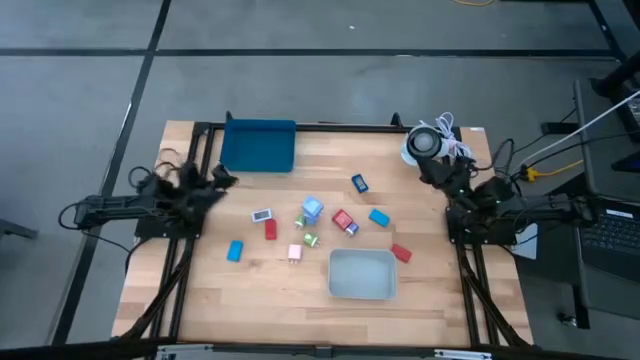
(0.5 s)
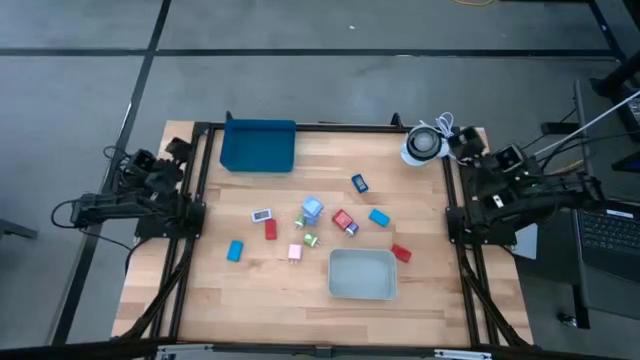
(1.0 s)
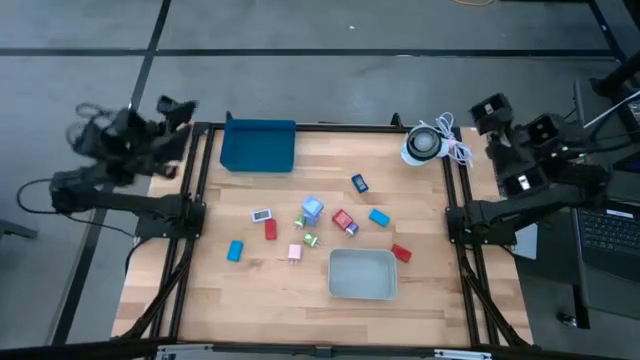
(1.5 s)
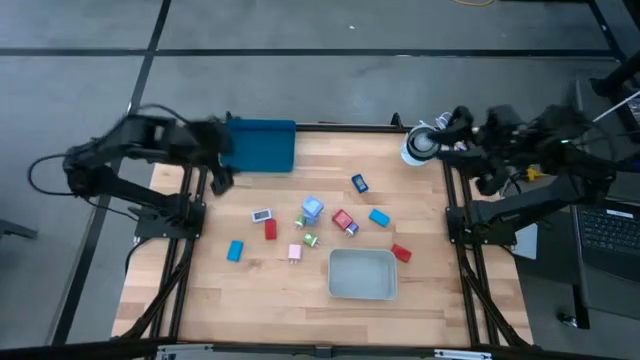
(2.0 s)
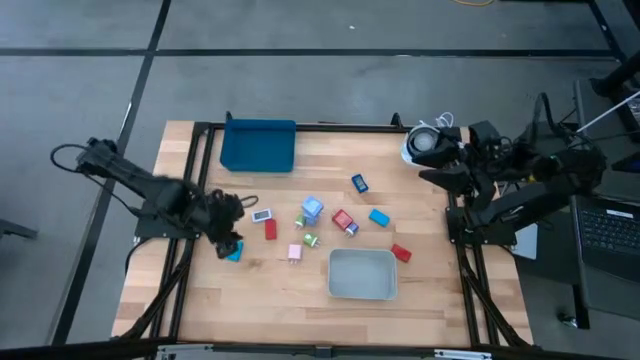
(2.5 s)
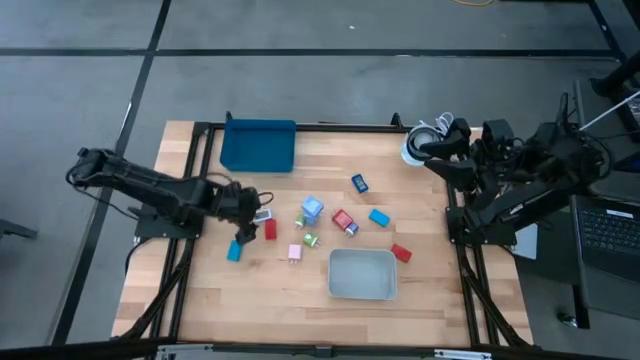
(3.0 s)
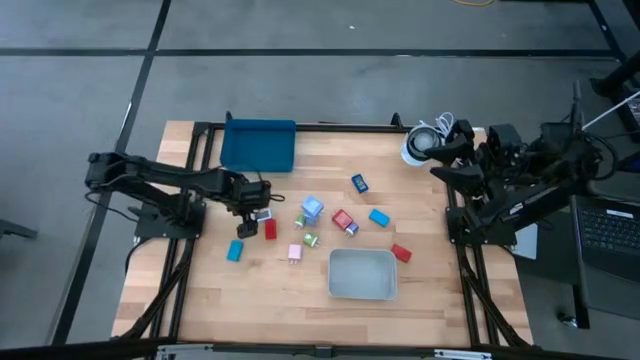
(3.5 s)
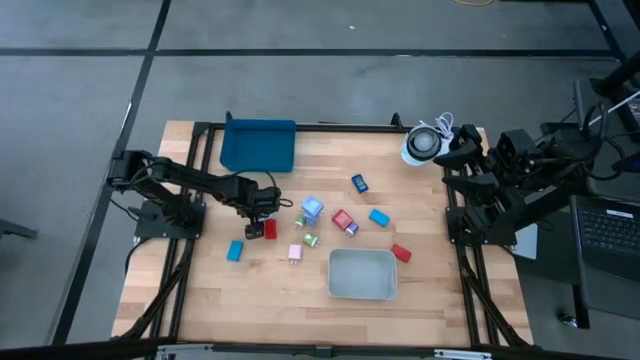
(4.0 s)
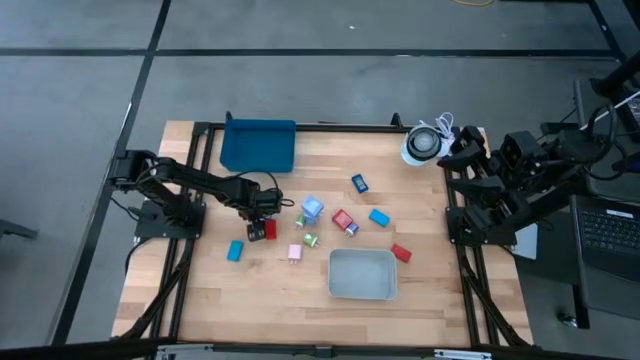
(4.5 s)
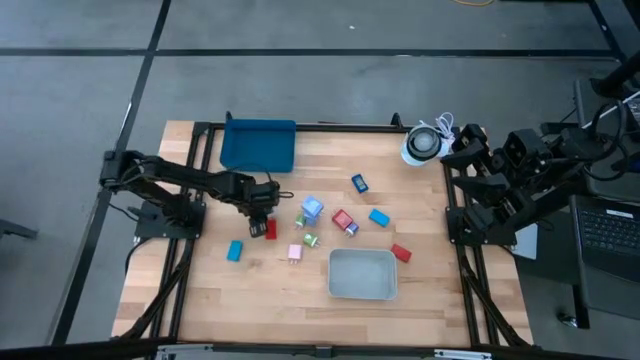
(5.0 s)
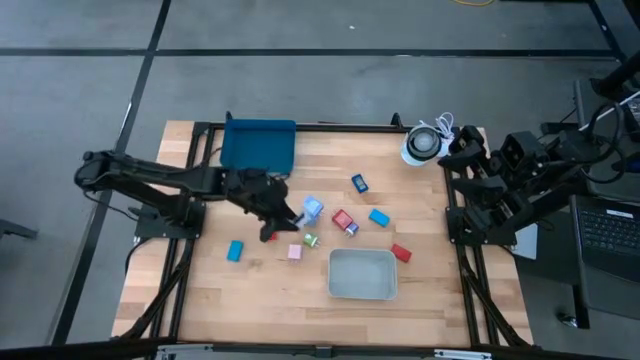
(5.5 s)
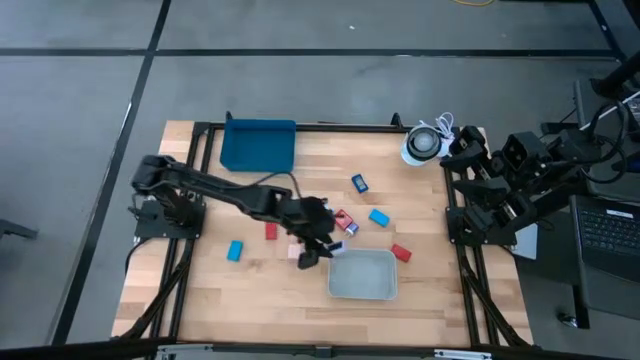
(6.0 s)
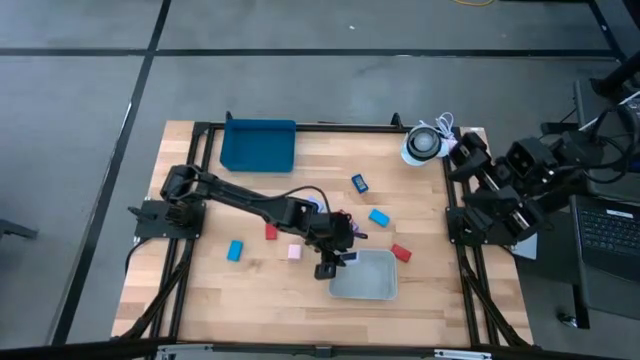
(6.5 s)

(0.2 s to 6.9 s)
Task: Pick & Place Office items
Put the white digital clock into the gray bin

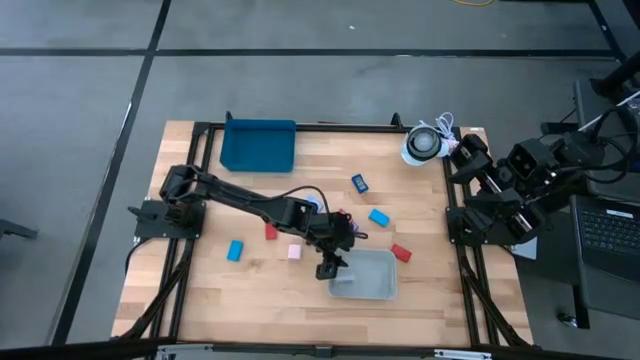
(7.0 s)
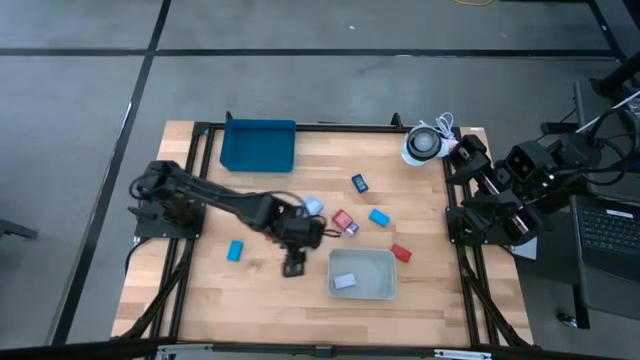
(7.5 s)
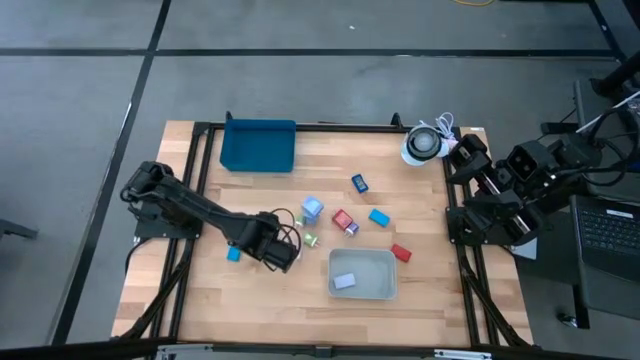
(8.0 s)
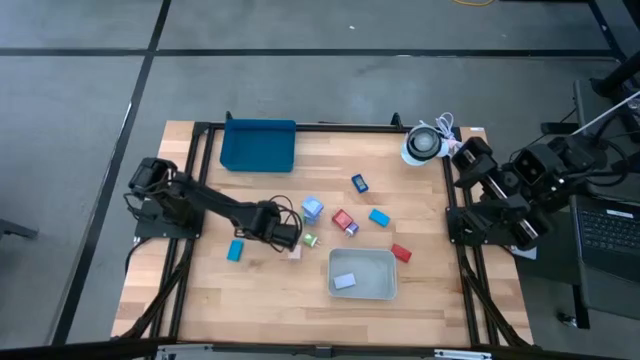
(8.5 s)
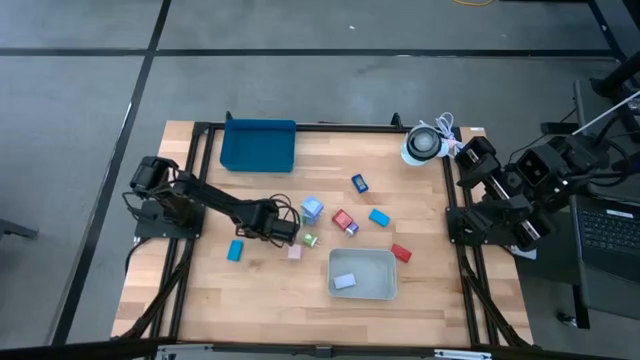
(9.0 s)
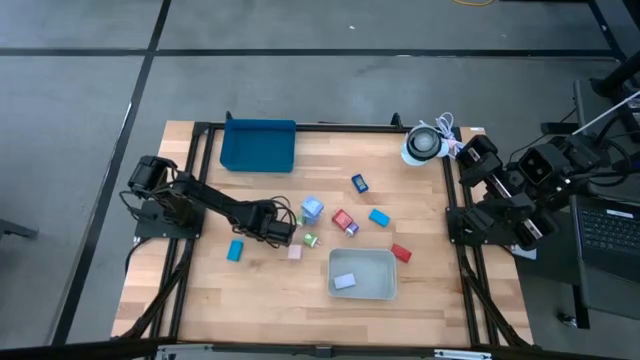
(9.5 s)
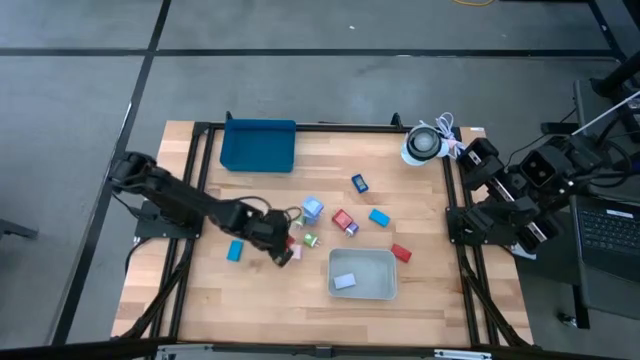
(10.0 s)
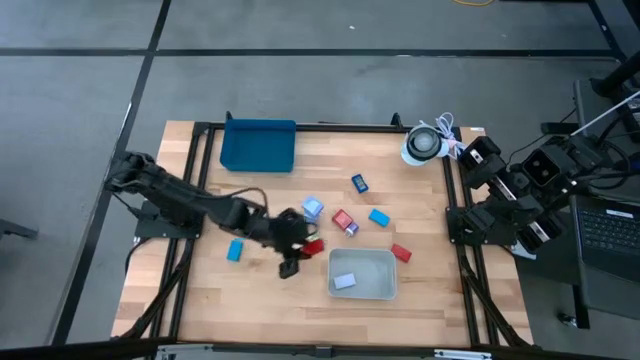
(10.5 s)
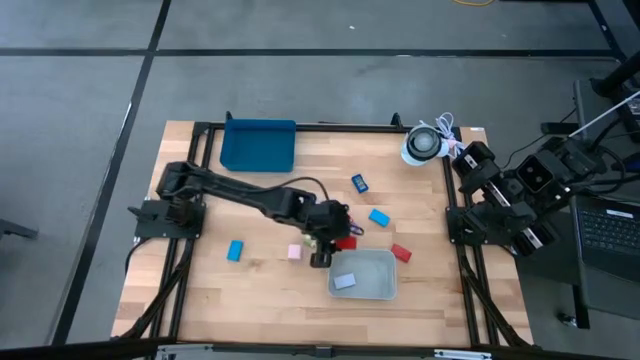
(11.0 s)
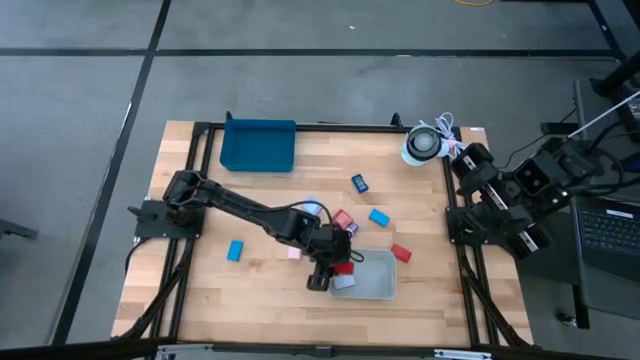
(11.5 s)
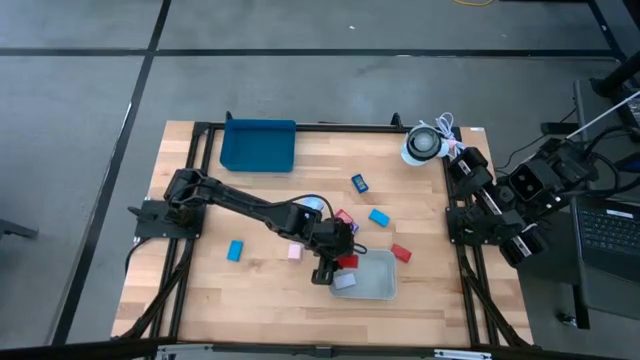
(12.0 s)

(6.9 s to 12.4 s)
Put the left red digital clock into the gray bin

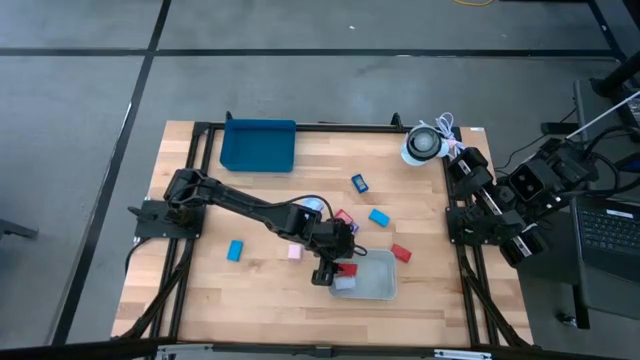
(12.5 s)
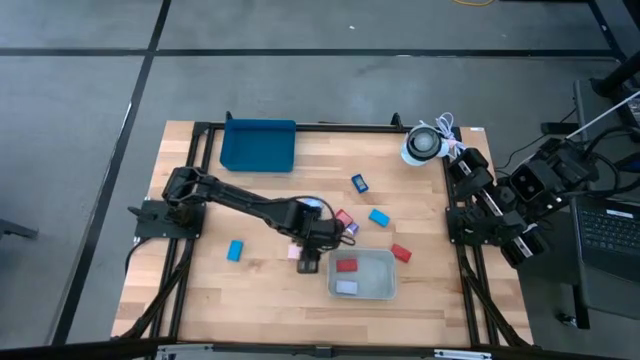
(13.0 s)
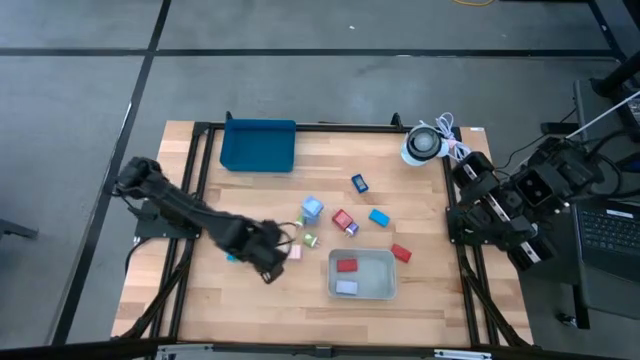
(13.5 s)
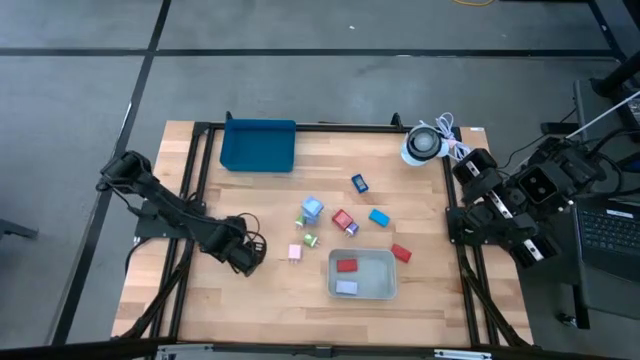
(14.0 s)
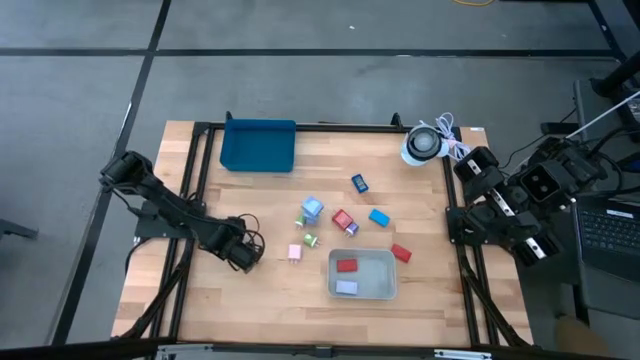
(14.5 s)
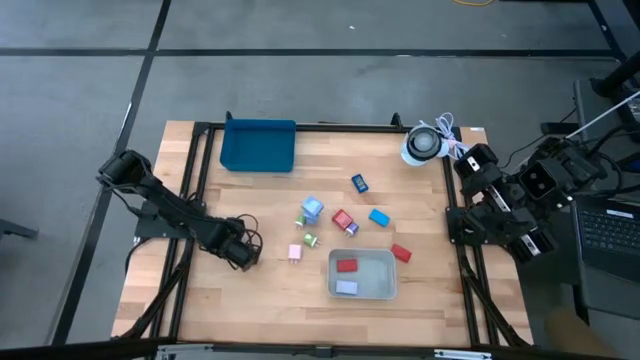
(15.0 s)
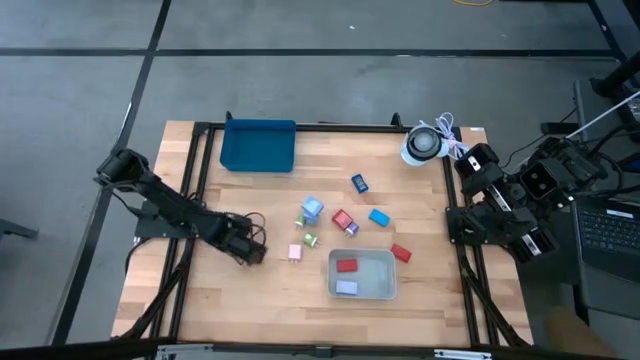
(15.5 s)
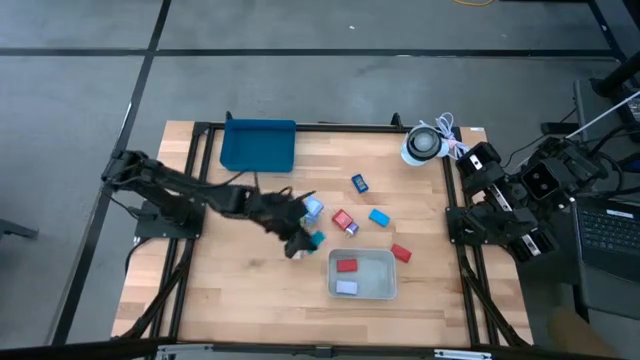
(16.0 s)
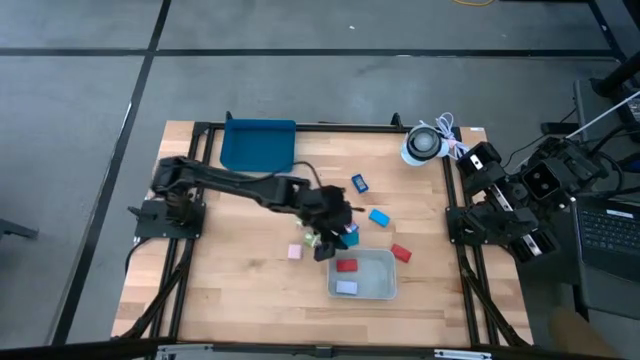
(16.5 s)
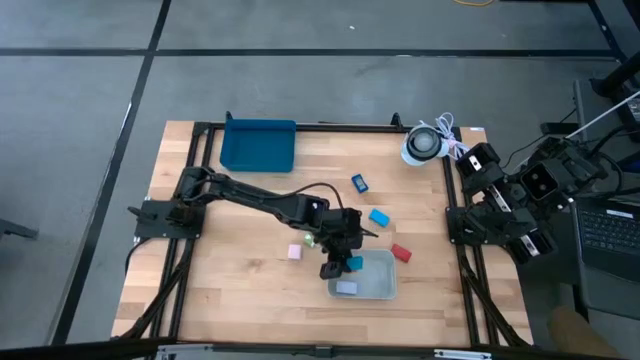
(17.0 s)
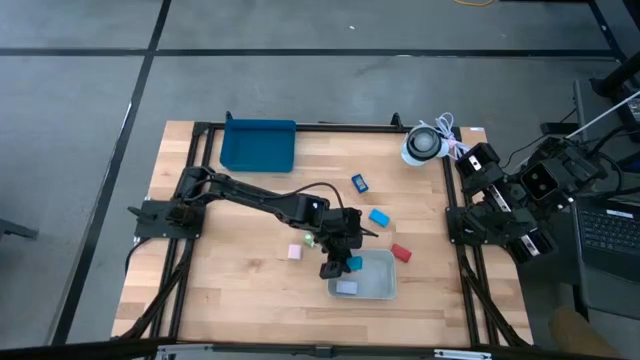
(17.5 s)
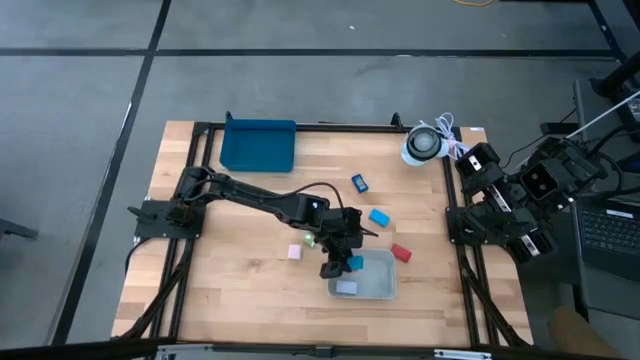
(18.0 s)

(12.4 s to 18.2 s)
Put the left blue digital clock into the gray bin

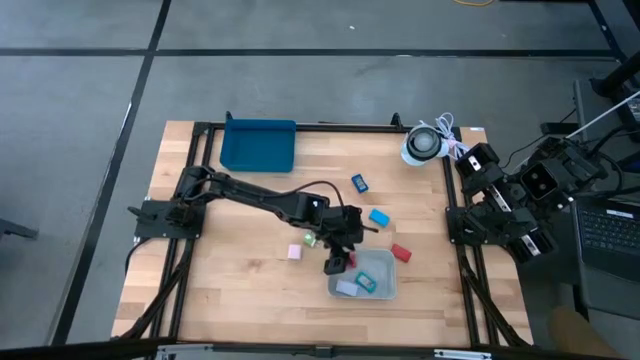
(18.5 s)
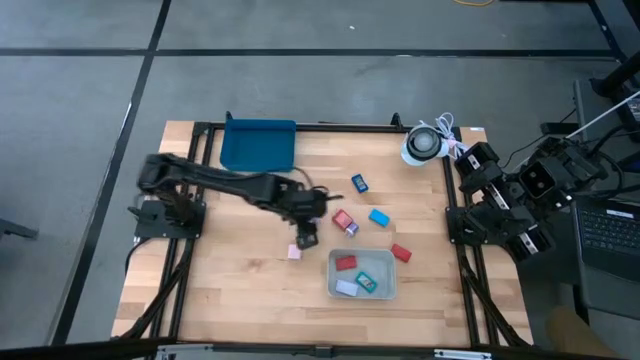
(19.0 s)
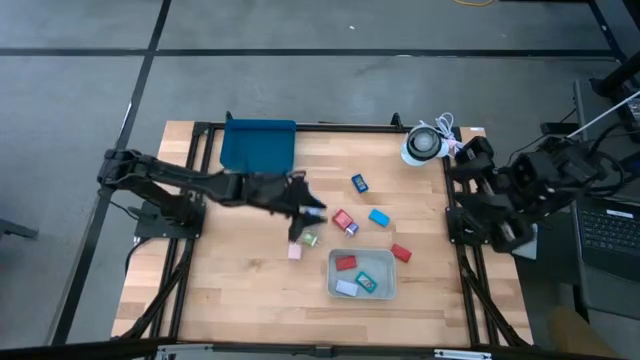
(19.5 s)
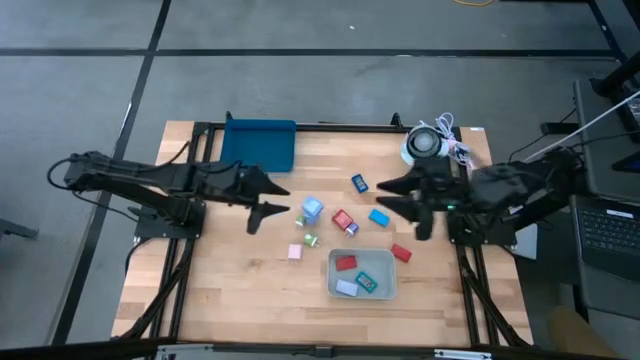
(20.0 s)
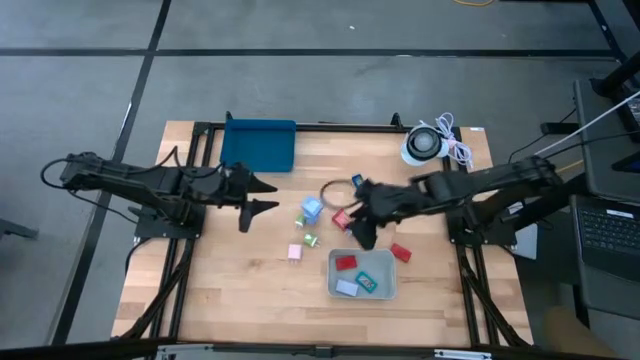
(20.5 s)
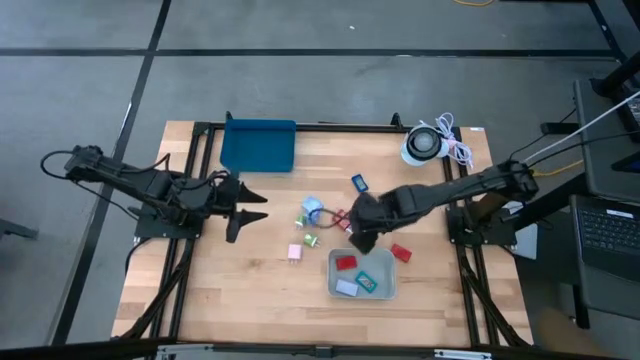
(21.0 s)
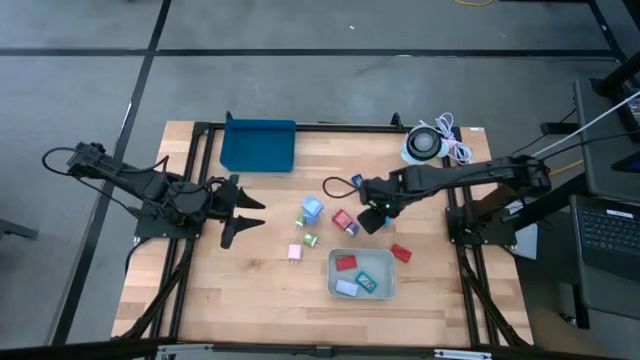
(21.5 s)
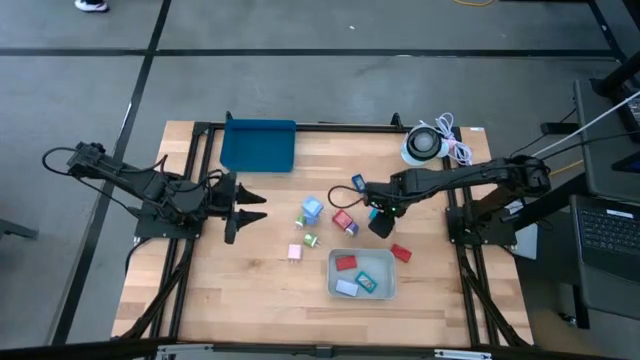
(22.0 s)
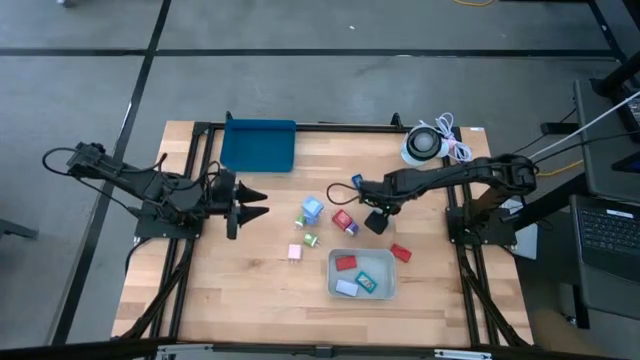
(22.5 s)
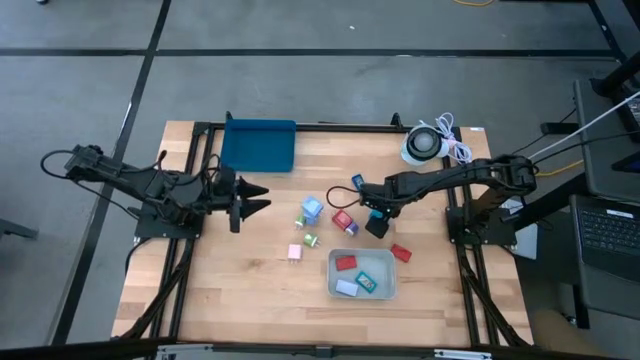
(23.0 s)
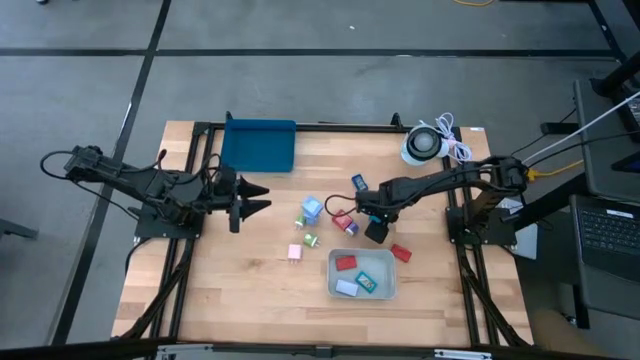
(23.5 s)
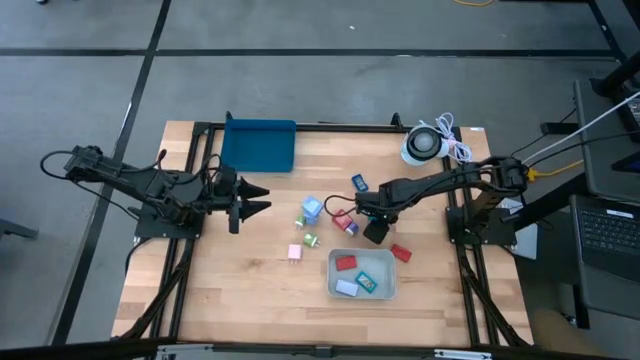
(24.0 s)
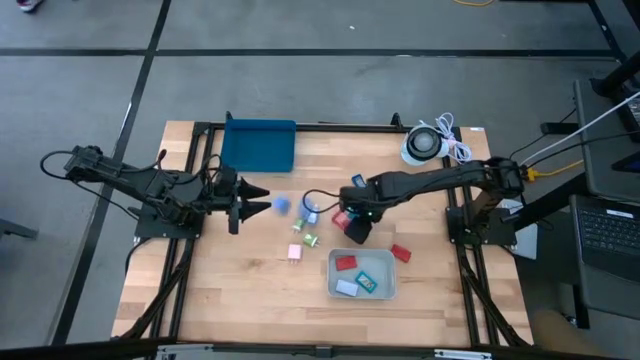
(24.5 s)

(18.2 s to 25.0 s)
Put the blue digital clock into the gray bin
